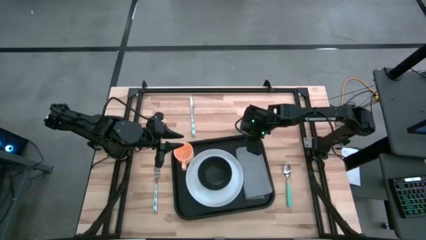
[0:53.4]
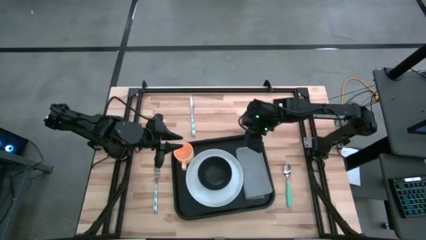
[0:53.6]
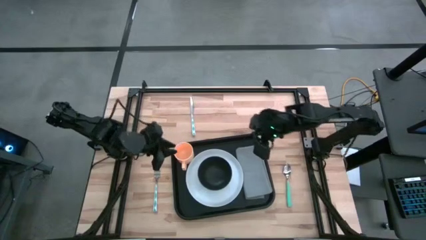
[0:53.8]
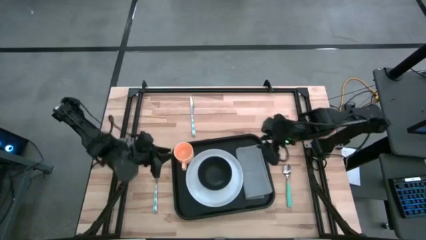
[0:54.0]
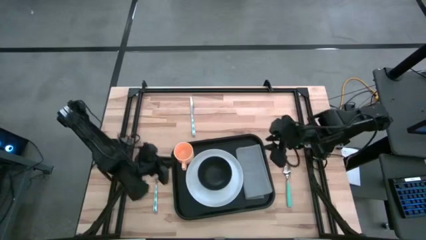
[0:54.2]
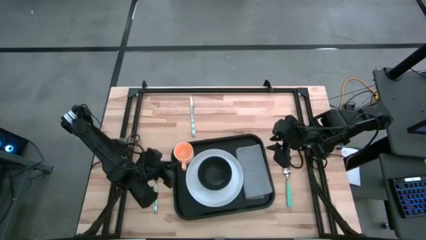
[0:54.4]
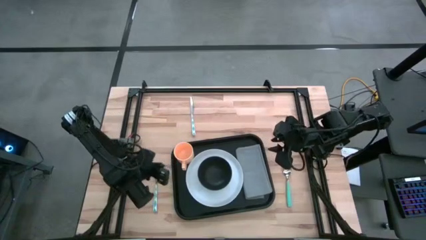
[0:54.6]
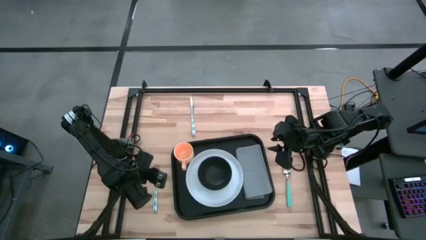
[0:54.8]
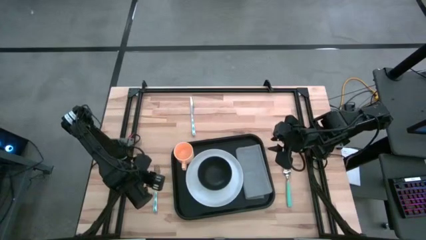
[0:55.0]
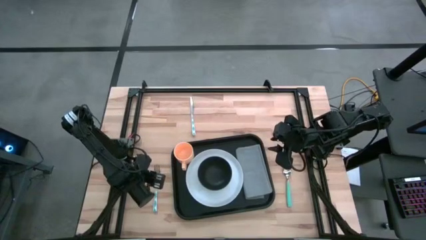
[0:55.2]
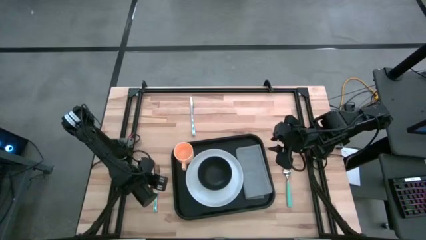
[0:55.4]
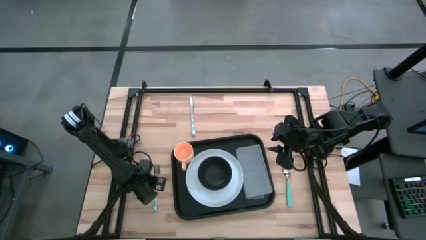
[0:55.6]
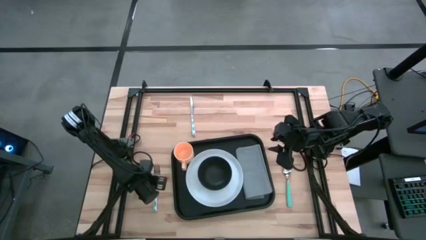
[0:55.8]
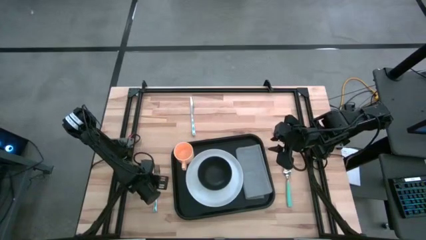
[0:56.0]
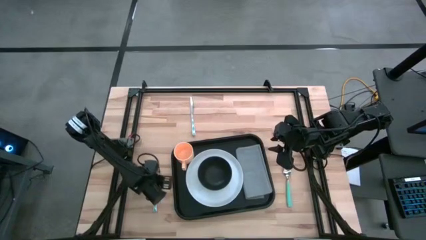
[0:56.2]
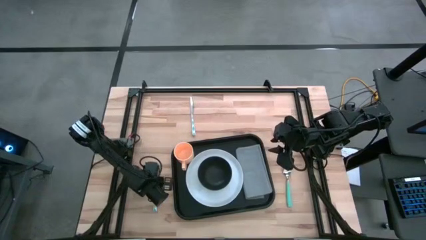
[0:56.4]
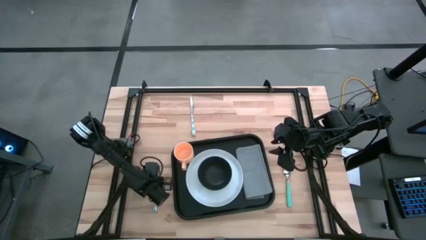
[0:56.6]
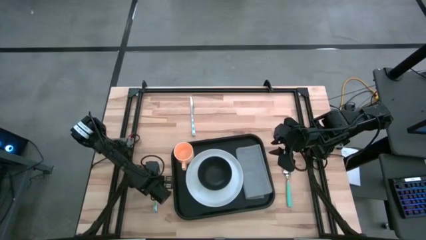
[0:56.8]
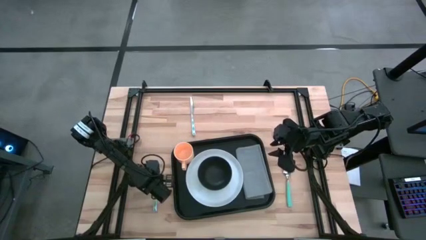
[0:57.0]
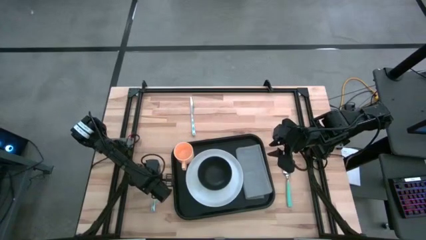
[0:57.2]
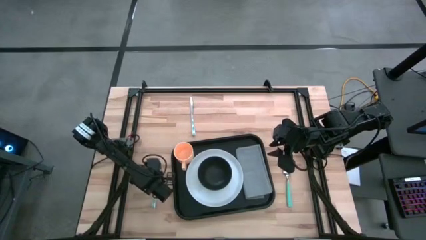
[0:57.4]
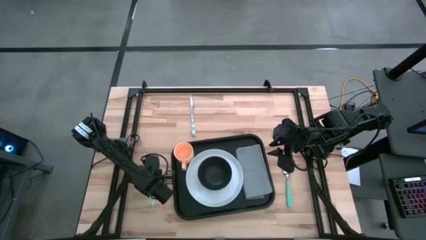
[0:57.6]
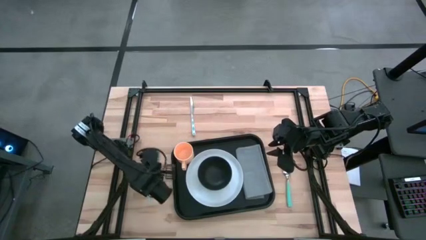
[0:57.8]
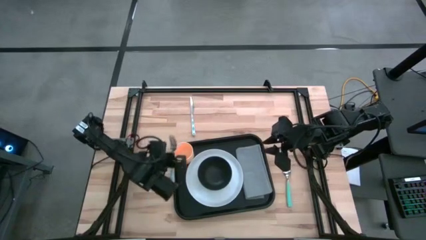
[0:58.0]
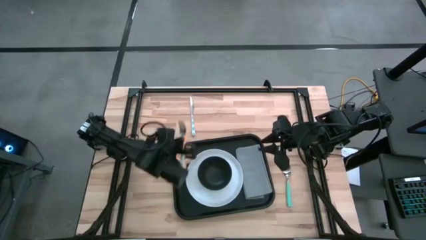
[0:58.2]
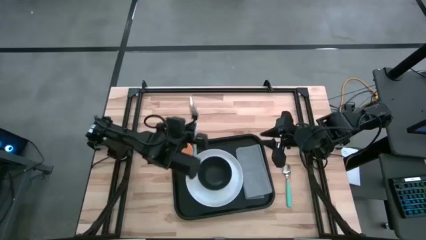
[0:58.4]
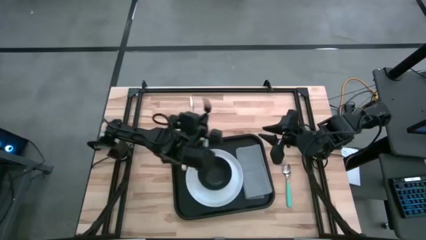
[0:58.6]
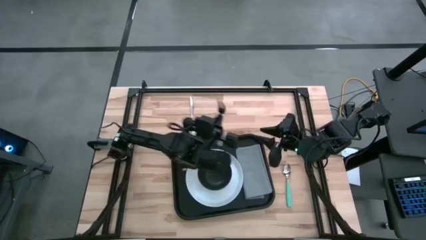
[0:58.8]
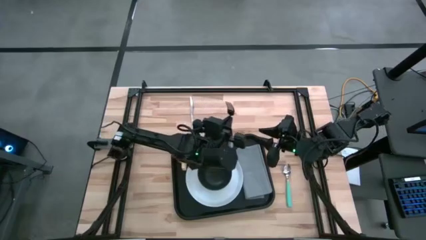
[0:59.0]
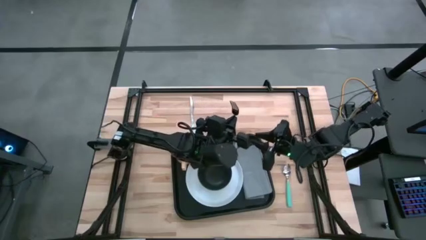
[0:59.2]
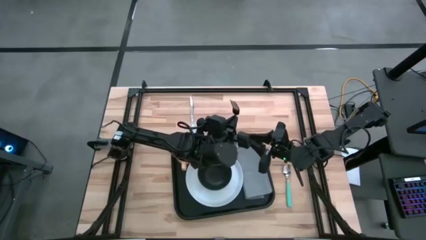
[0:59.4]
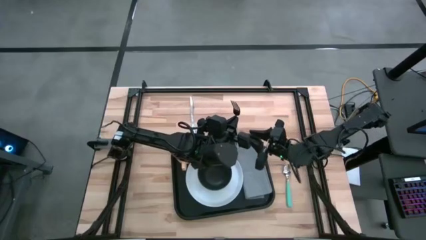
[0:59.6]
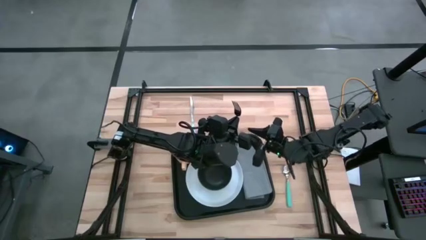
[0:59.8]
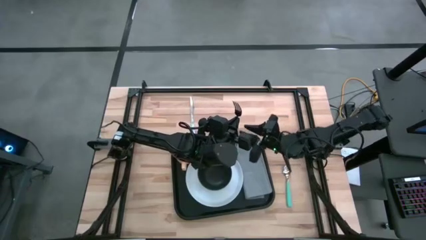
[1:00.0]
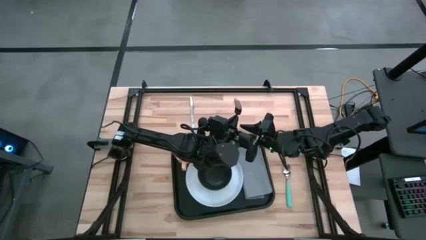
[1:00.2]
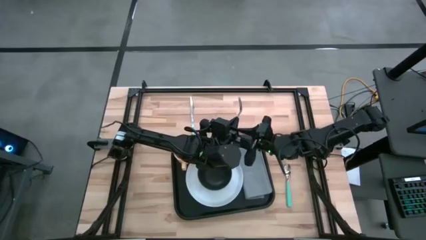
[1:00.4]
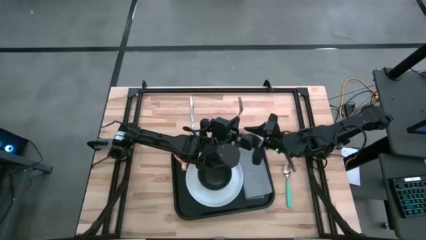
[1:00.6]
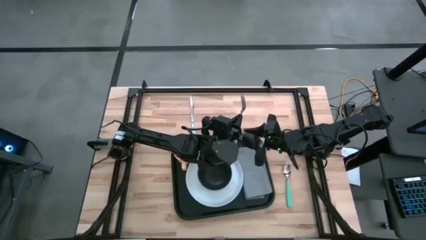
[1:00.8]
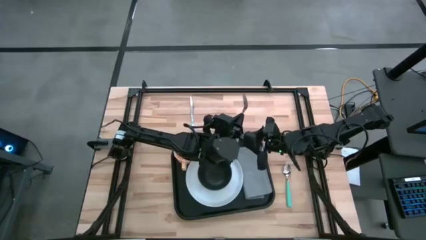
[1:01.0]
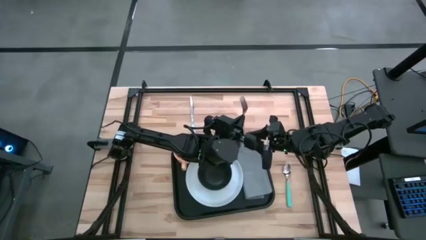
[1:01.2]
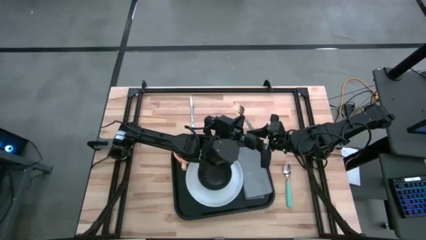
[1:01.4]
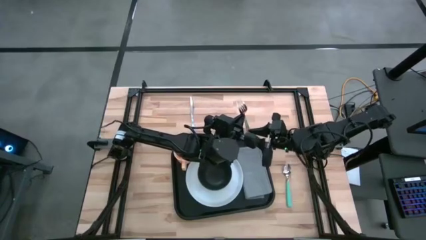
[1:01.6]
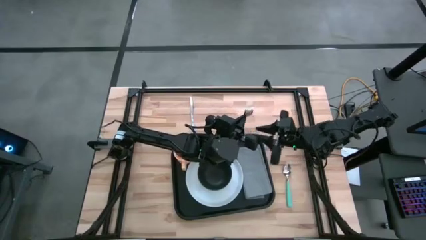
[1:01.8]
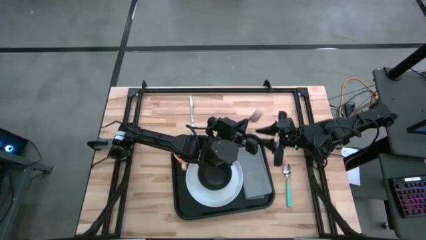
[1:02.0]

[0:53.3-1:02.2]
Task: Set up tray
Put the blue fork on top of the gray napkin

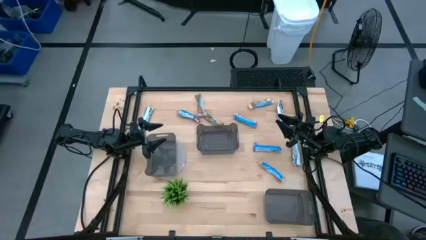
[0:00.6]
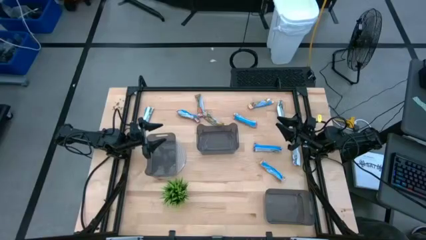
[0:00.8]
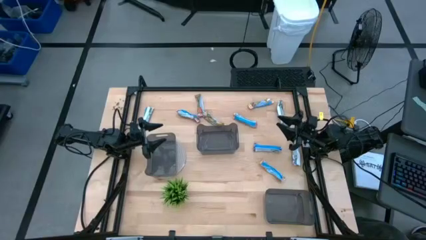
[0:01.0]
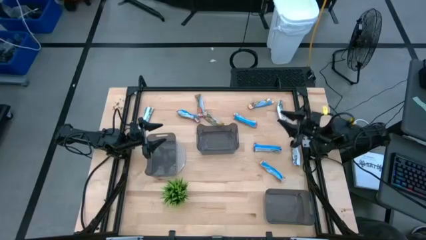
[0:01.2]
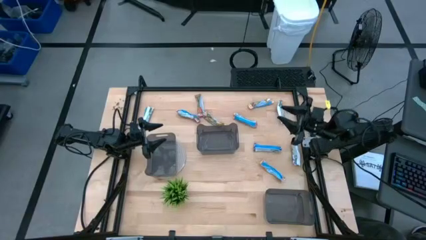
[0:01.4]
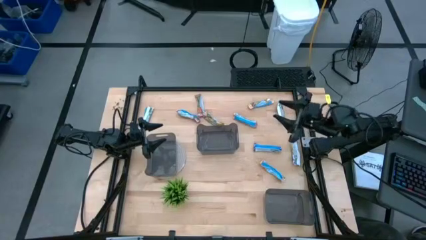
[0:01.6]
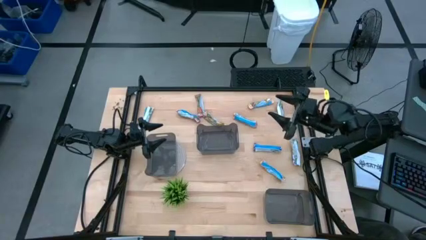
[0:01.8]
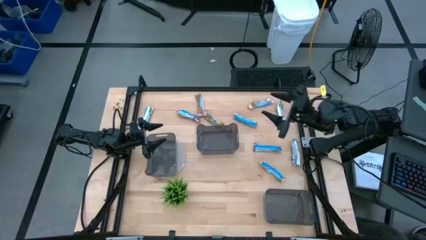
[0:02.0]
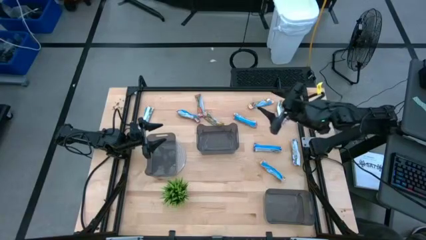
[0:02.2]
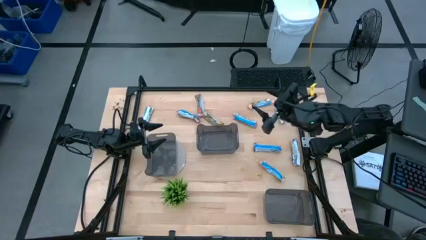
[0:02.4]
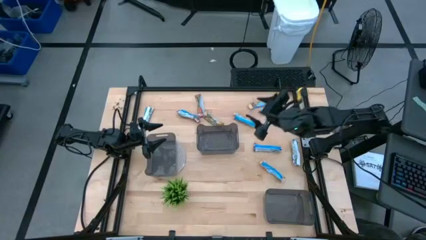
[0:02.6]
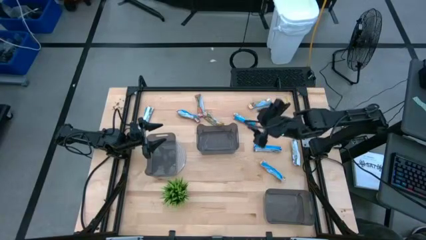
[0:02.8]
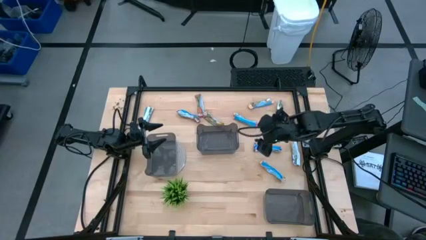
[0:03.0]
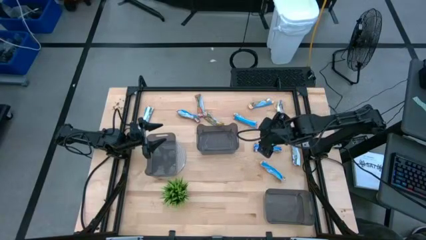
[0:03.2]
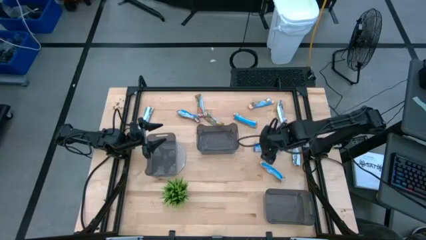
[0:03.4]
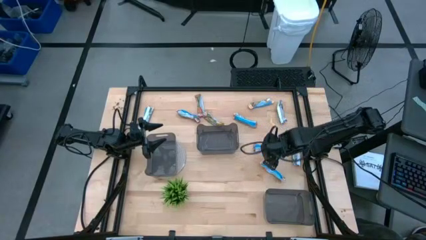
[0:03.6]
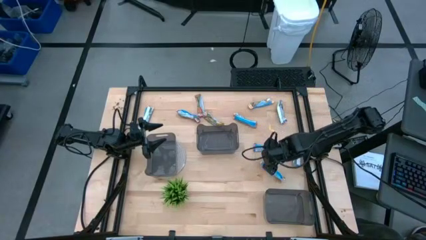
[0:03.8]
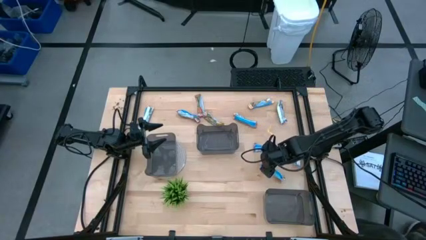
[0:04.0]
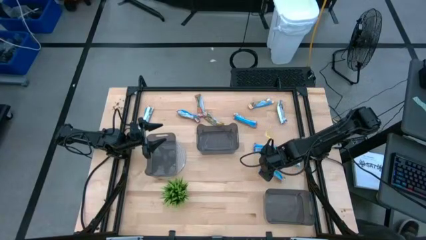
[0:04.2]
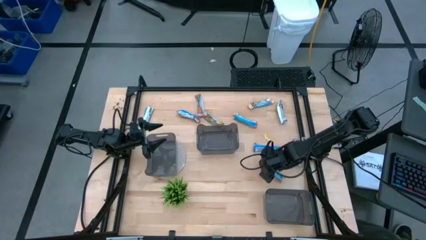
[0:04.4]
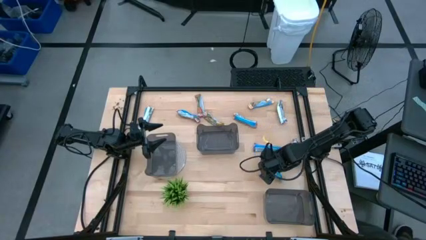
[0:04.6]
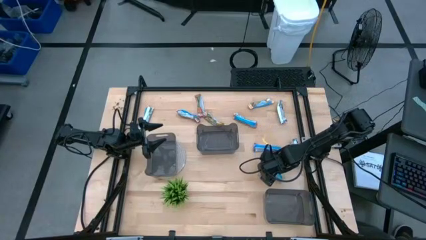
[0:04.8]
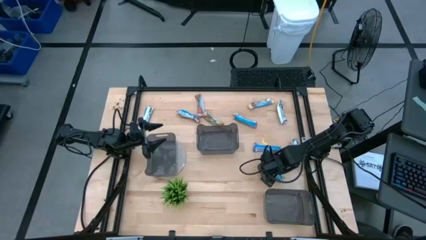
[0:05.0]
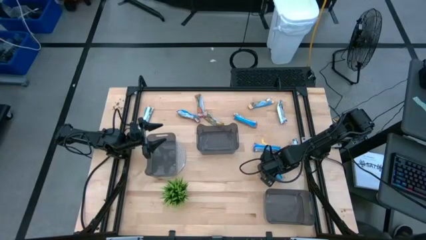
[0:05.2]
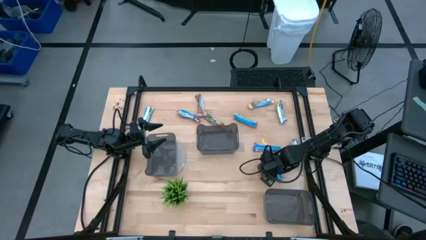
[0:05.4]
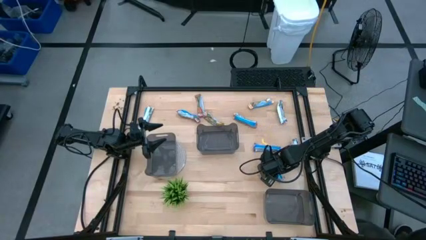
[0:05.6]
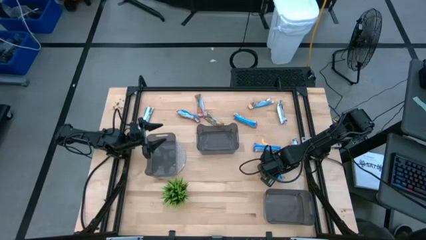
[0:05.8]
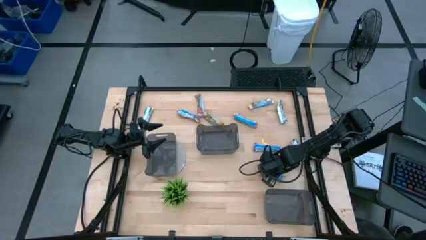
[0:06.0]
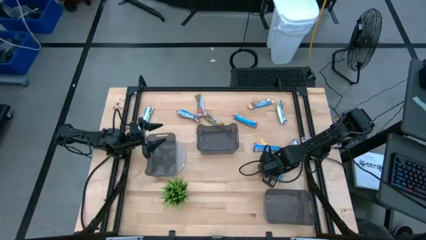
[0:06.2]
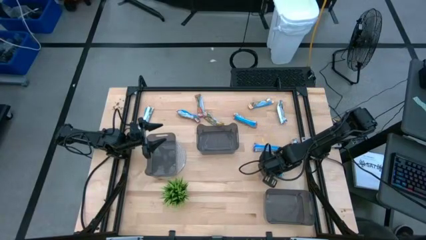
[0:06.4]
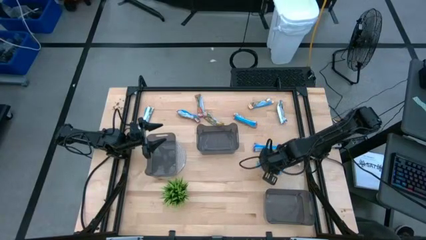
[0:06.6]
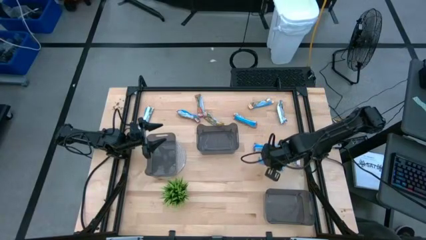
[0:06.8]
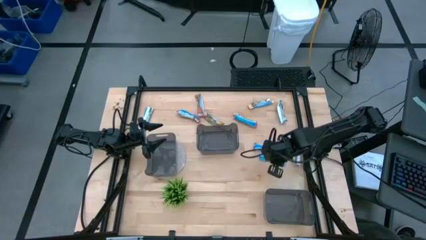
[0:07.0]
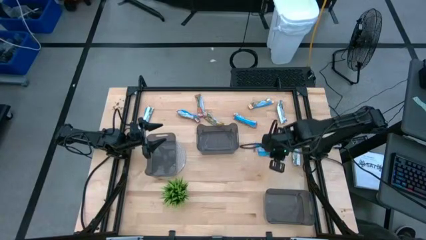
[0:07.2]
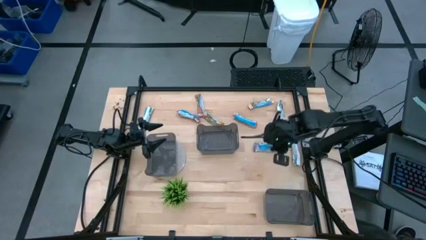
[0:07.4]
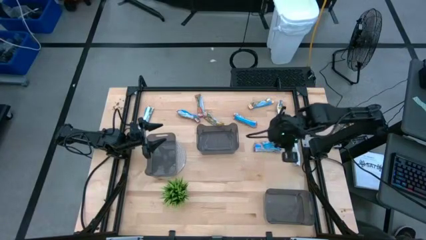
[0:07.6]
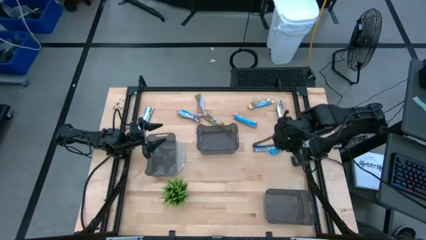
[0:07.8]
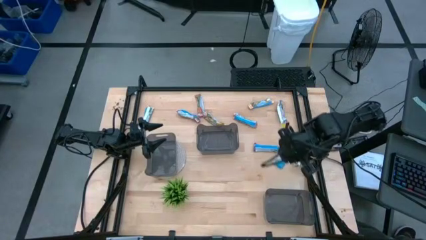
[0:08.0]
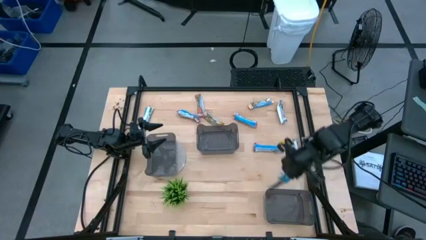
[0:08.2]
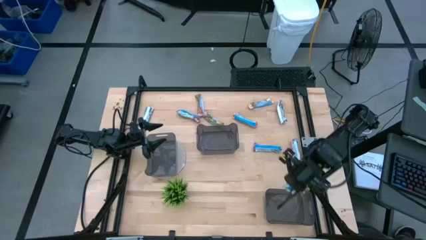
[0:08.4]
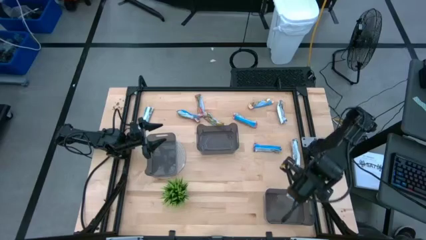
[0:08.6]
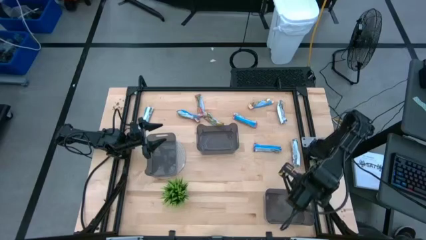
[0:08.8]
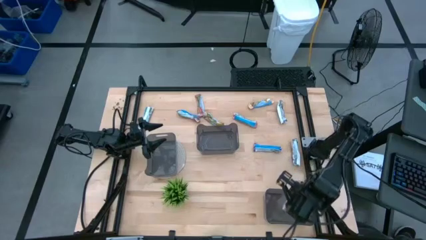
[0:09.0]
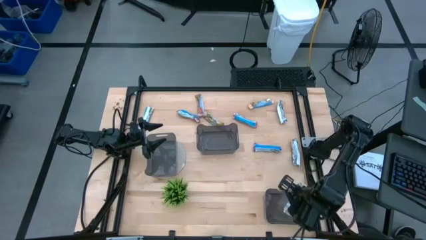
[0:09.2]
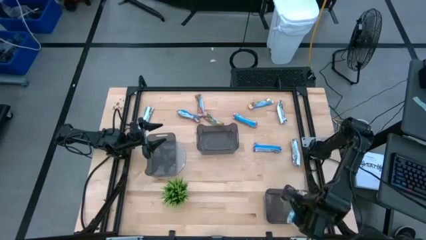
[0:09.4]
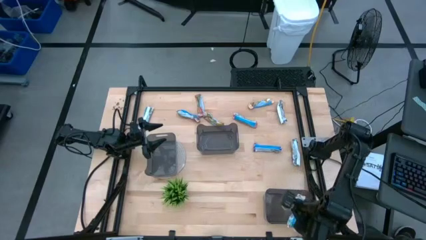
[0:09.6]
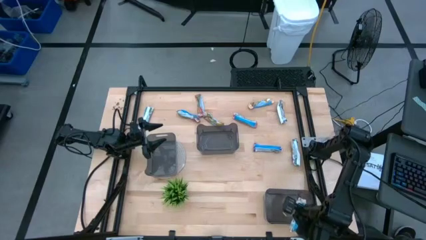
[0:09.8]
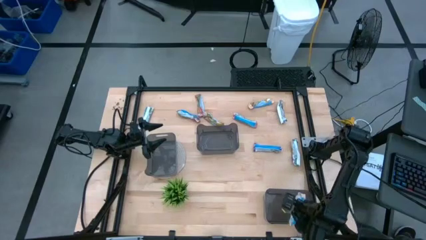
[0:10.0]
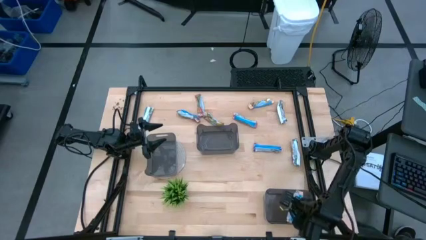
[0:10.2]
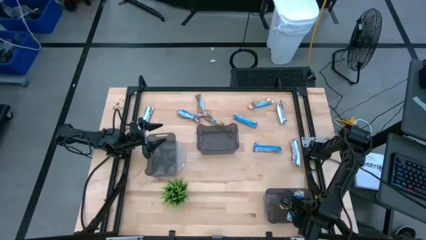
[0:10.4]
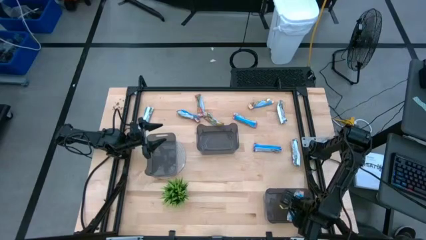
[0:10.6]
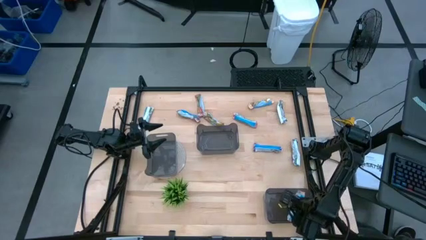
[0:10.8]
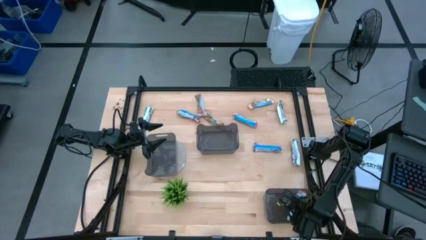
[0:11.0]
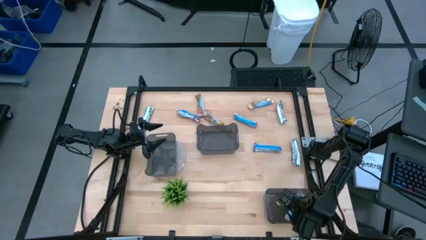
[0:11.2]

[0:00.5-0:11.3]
Task: Pick and place Granola Bars by type
Put the orange granola bar into the bottom black bin
